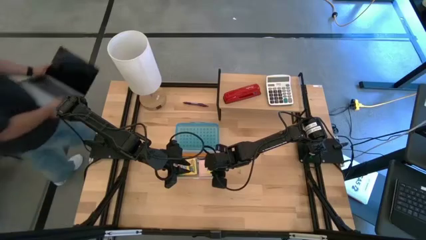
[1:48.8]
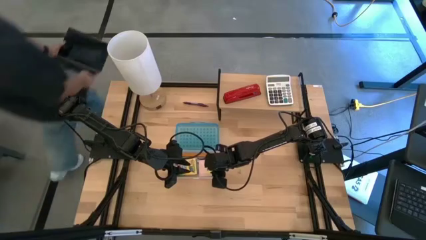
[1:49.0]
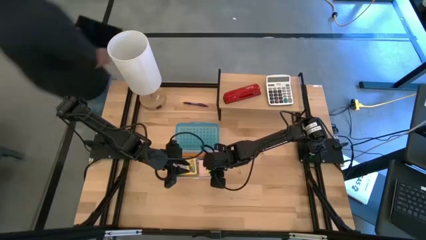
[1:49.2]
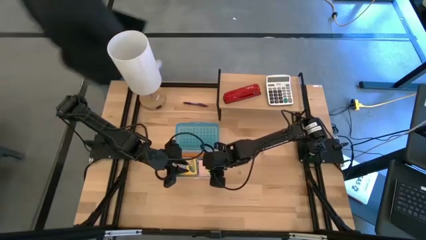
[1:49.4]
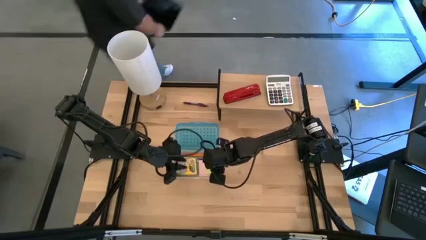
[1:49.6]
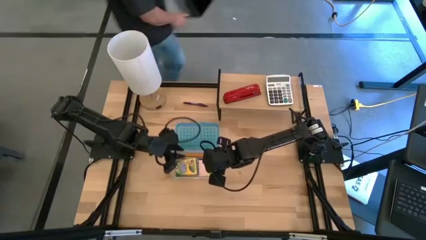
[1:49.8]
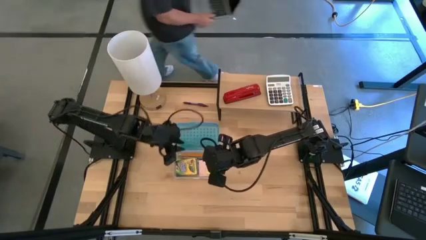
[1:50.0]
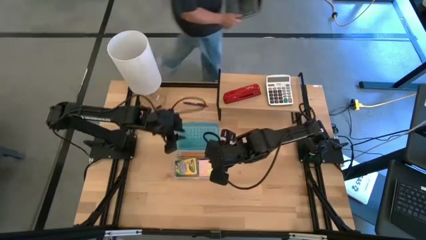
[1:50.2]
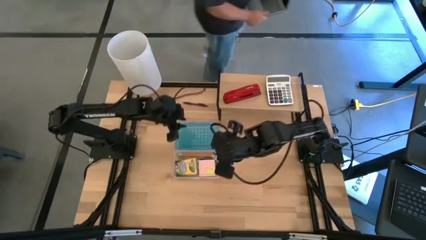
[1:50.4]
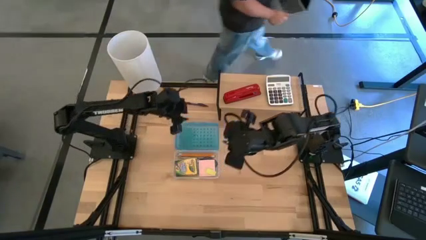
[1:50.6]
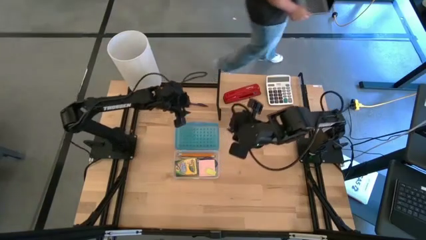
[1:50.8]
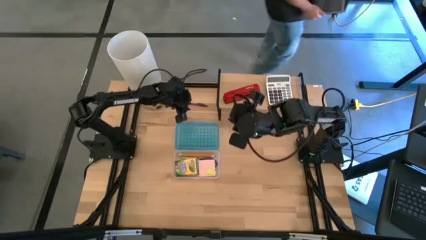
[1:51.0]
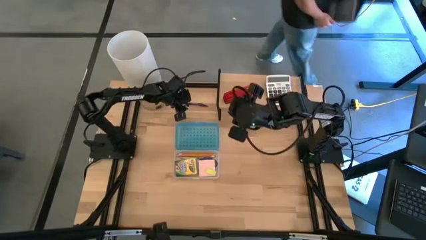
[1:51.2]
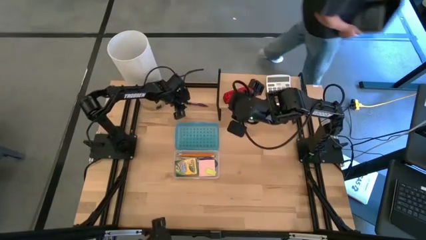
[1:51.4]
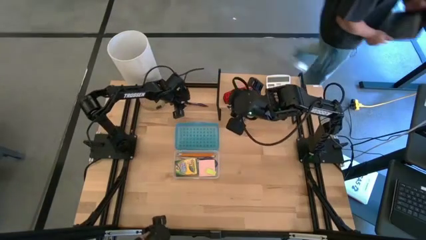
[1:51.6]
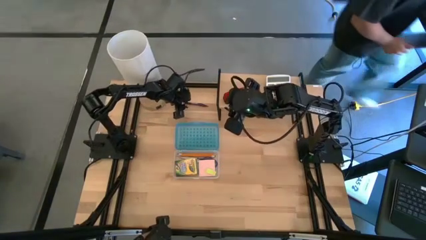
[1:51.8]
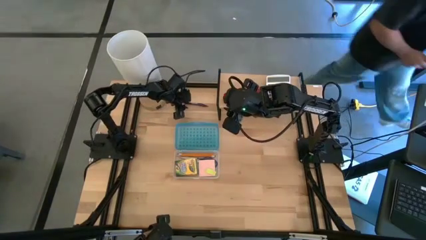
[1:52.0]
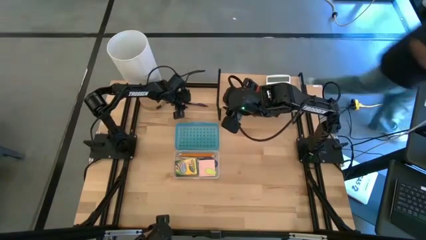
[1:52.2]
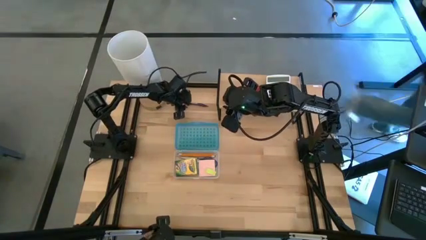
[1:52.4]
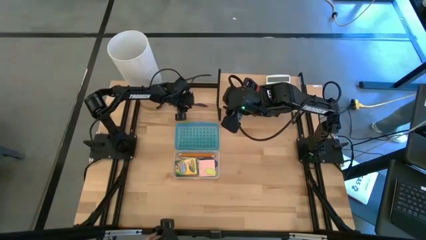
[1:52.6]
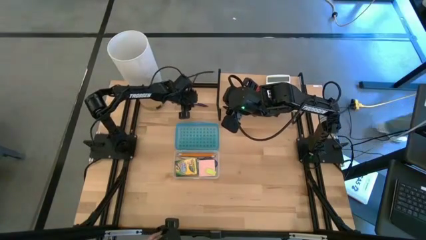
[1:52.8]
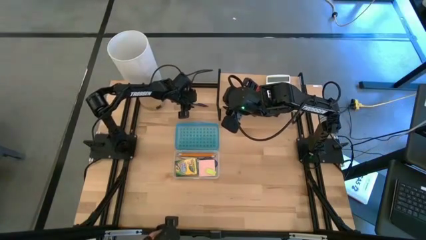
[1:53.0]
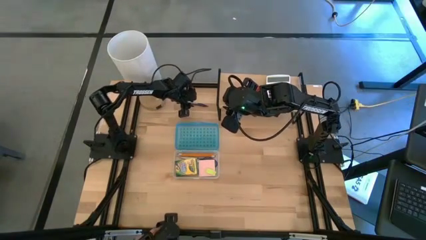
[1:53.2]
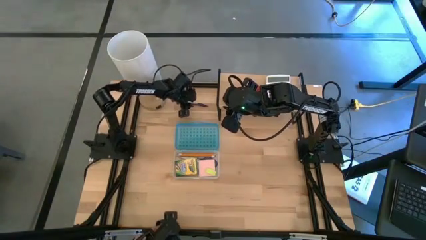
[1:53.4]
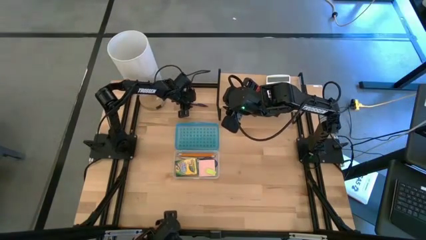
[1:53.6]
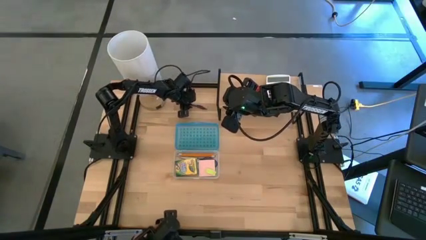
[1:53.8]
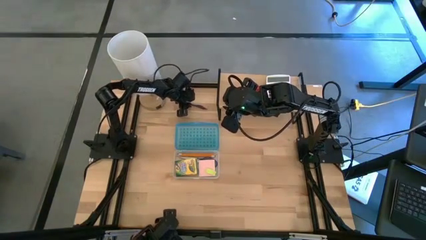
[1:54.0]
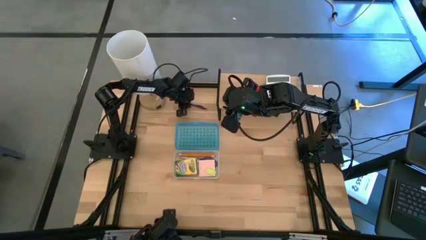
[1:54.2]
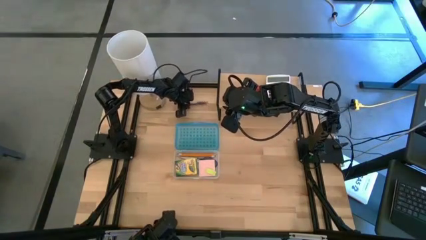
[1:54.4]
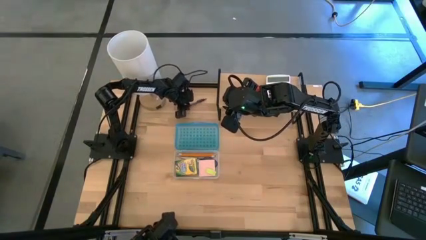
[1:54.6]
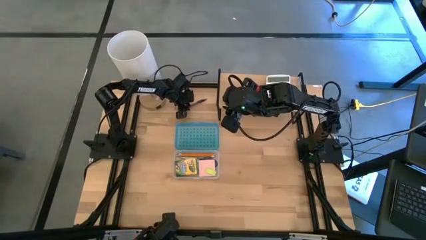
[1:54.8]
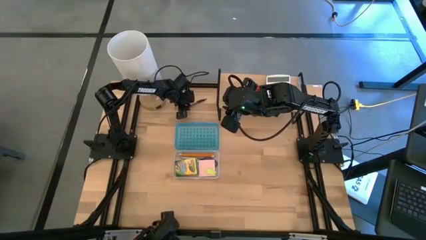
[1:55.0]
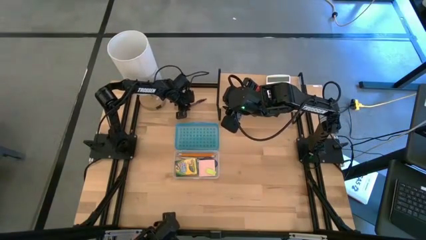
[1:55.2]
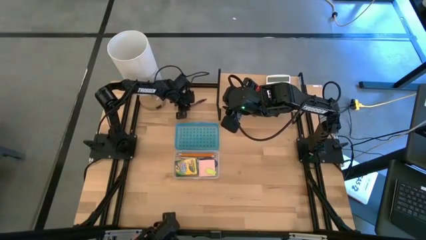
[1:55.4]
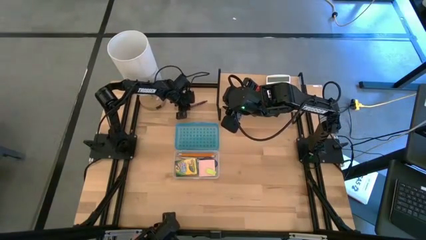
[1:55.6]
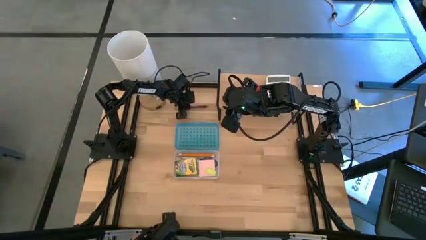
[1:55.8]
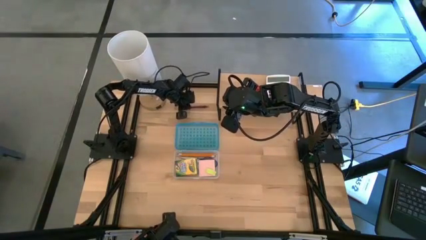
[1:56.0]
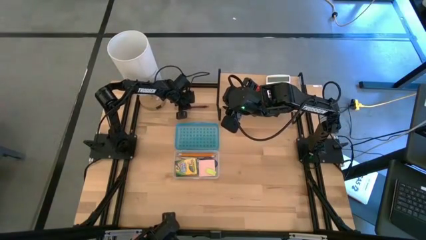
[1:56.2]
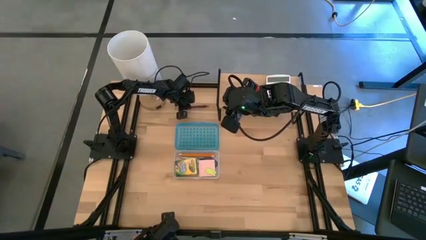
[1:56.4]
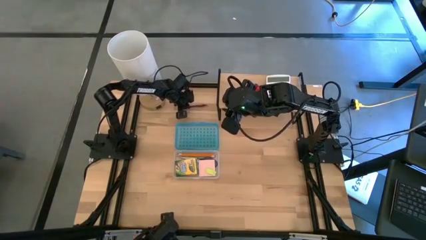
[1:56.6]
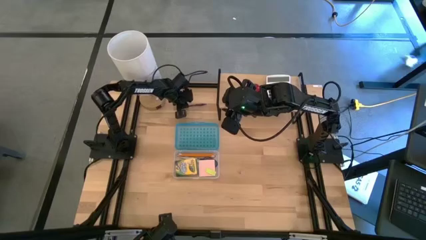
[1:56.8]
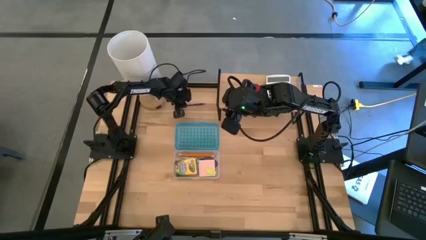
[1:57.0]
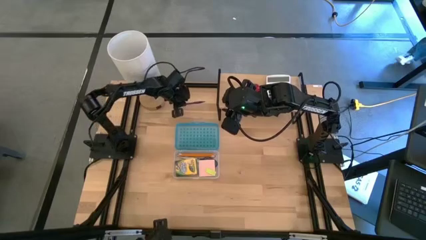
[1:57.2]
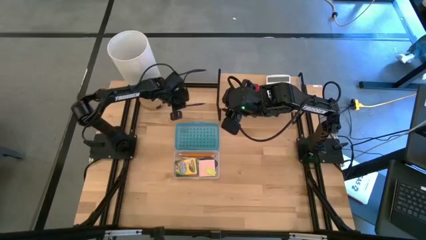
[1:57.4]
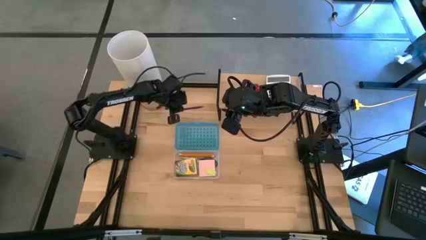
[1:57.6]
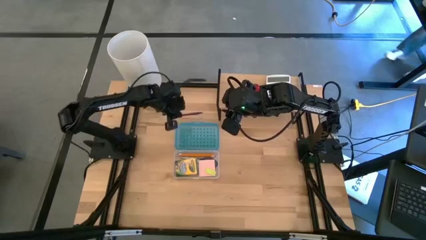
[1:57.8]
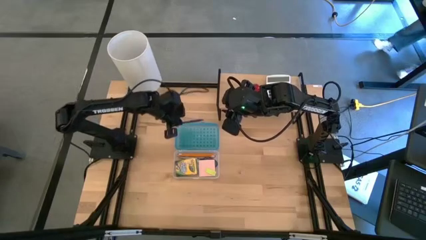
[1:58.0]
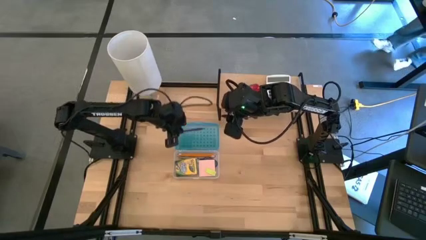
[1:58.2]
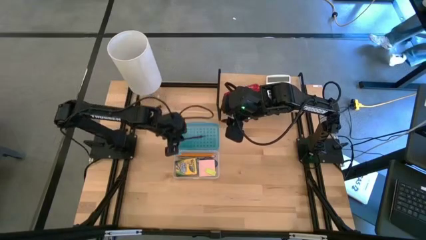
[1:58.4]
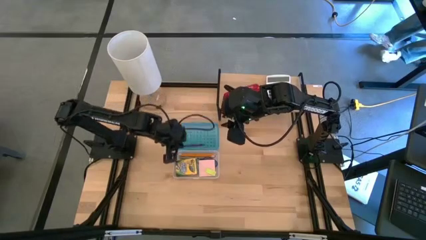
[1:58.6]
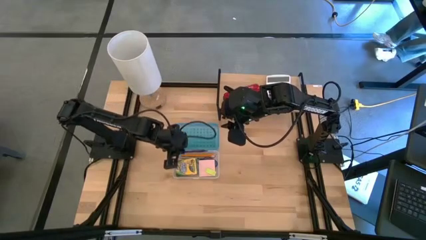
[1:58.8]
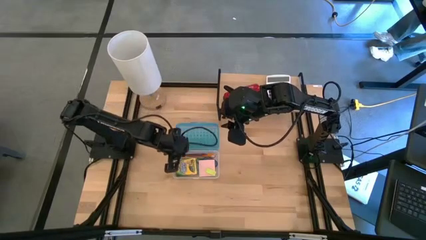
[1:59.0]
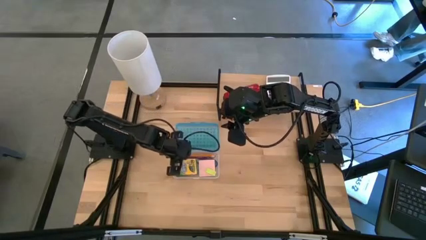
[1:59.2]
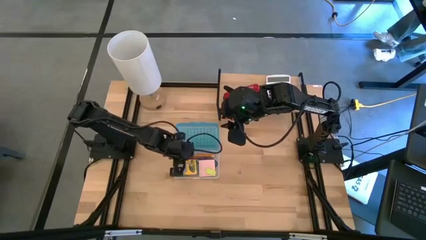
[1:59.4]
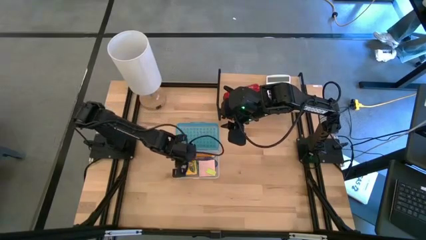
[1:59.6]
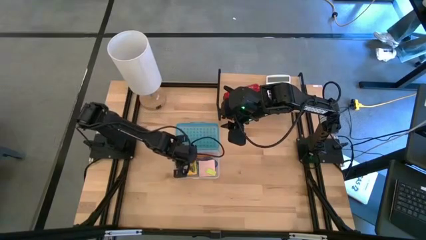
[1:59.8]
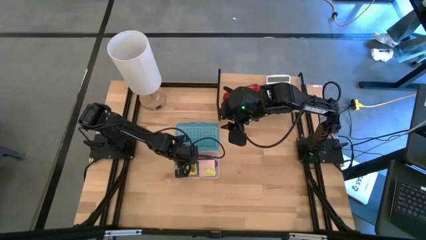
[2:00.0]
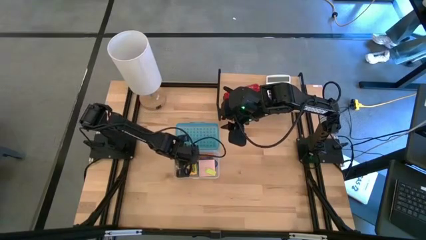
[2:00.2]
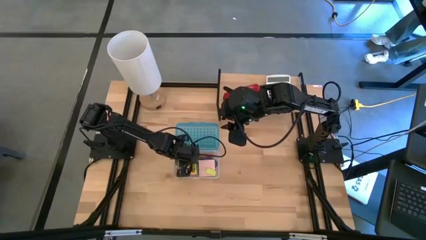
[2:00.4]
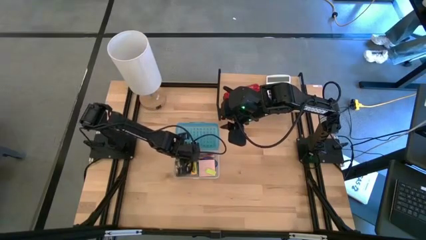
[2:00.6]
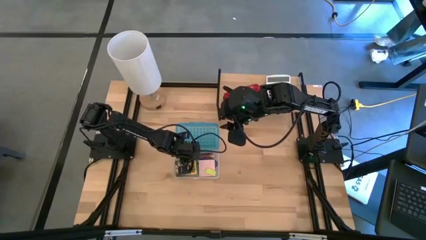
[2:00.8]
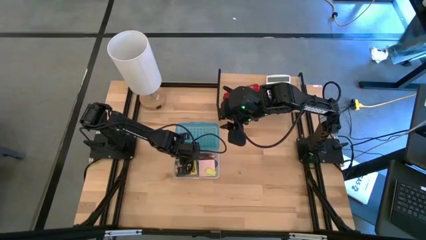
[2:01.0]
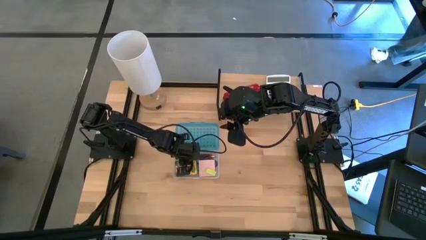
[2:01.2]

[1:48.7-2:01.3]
Task: Pack school essentials
Put the black pen into the blue supply box

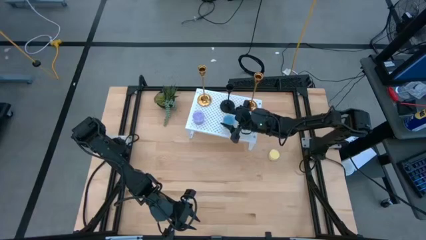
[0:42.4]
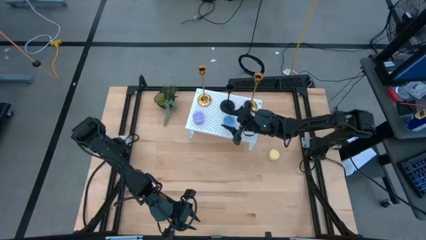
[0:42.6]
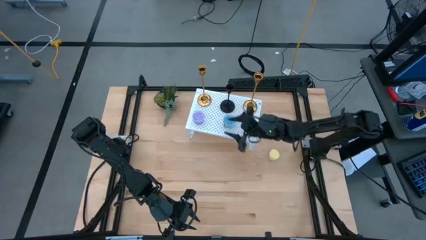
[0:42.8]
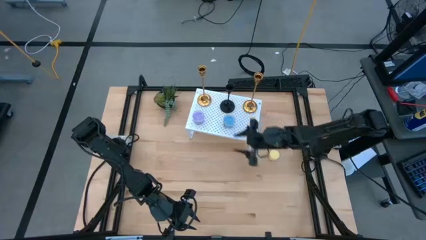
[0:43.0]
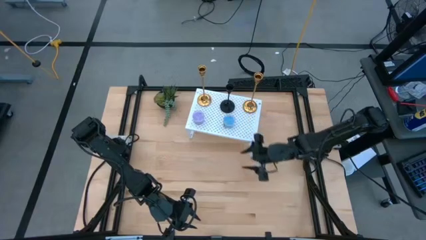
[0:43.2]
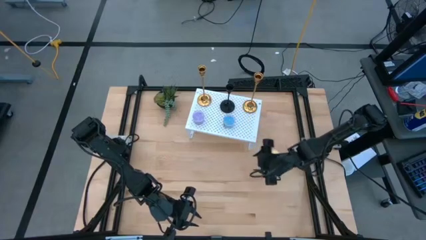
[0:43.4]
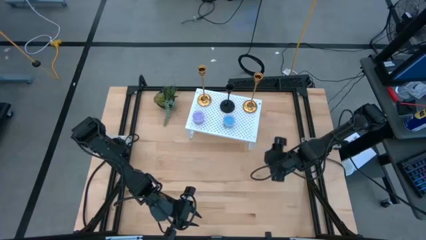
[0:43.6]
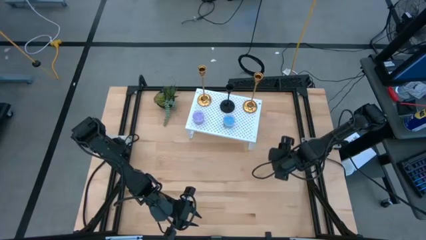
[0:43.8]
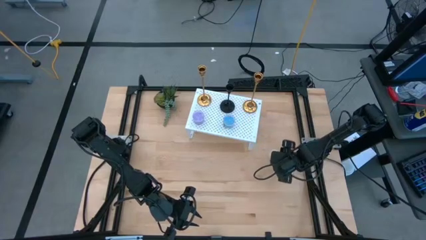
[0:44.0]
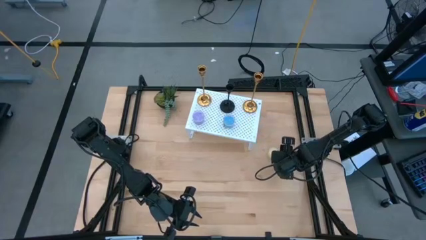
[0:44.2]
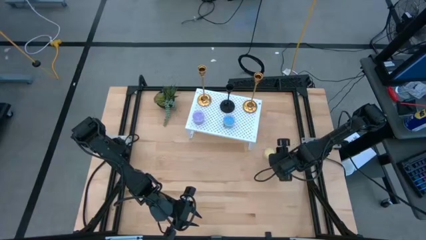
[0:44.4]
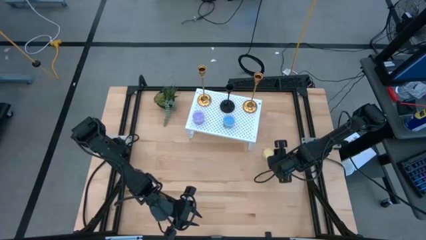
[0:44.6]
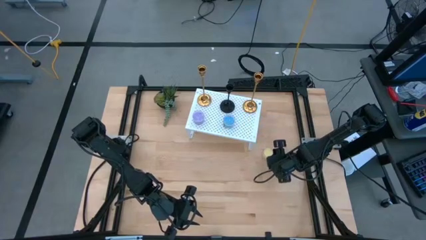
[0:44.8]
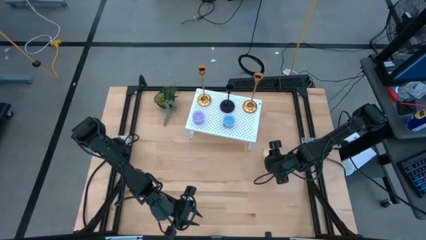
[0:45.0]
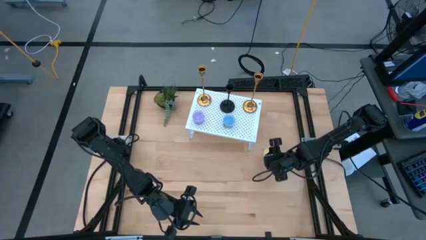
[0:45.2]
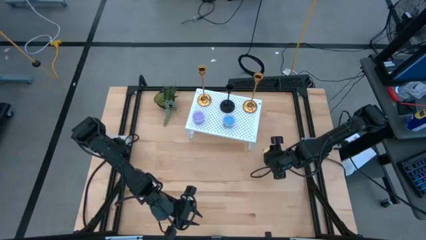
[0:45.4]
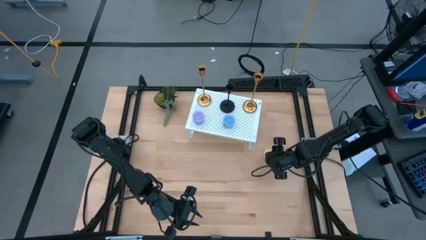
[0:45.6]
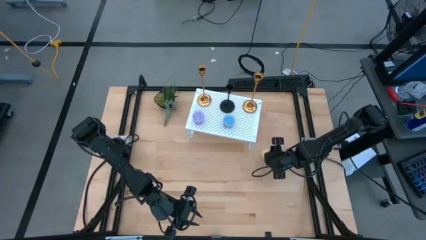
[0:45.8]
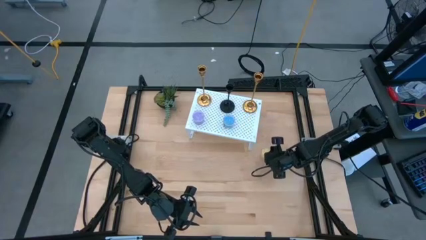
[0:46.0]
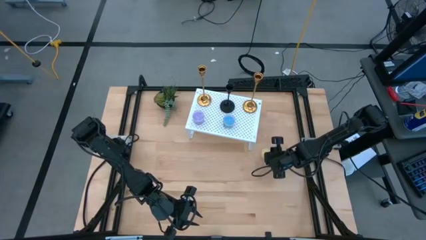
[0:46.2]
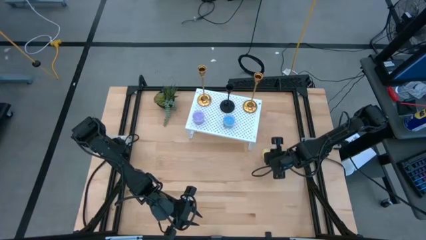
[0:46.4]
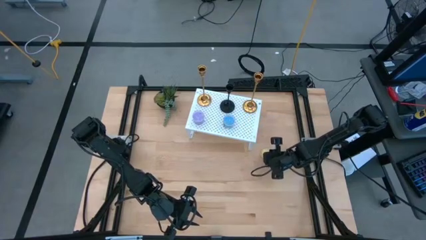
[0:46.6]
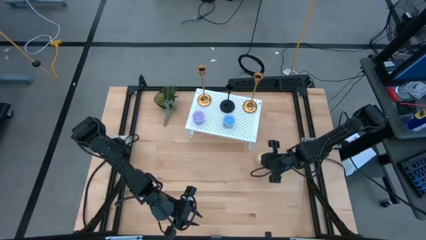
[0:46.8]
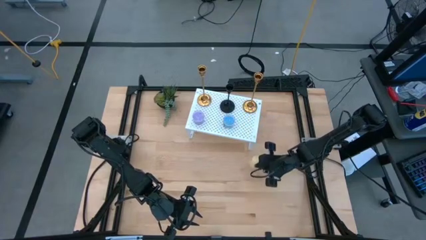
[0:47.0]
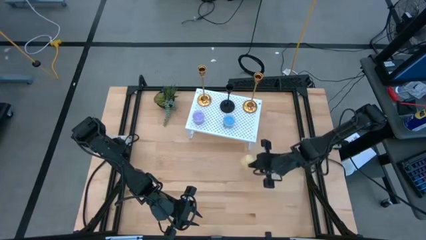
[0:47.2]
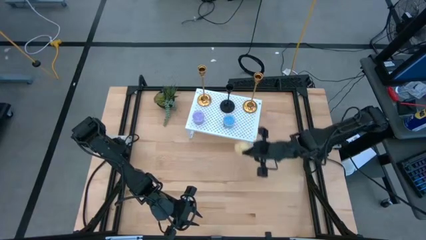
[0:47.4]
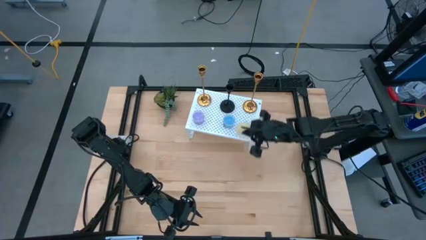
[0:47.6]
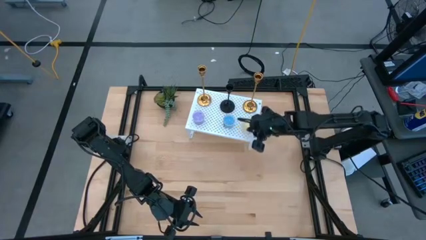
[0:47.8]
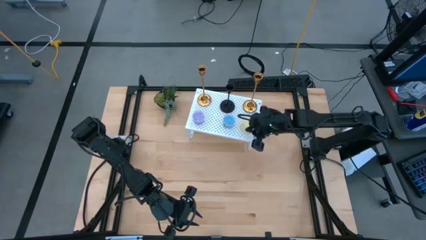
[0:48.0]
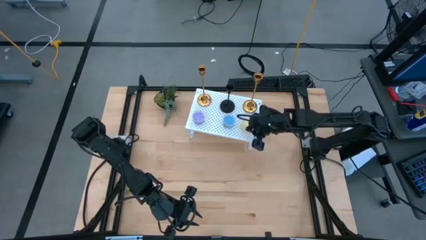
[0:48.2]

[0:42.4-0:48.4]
Task: Pick & Place candle stick holders
Put the yellow candle on the shelf aligned with the violet candle on the shelf
